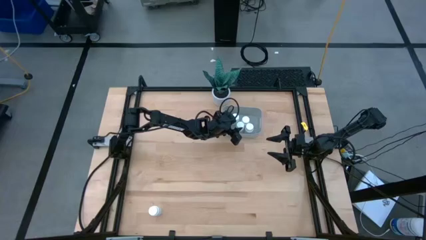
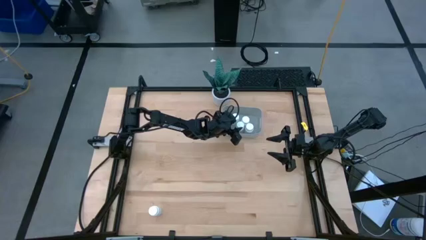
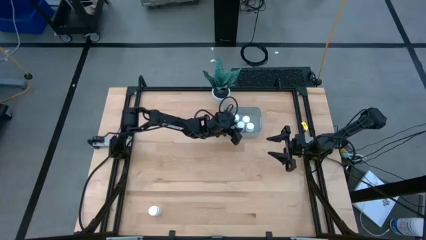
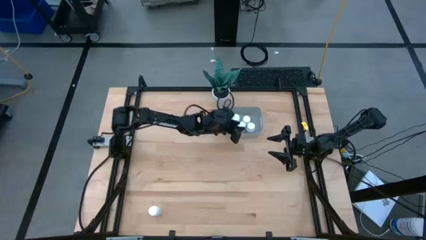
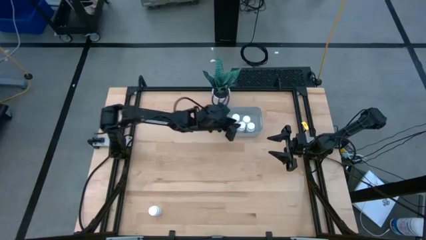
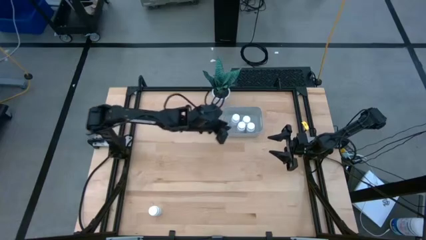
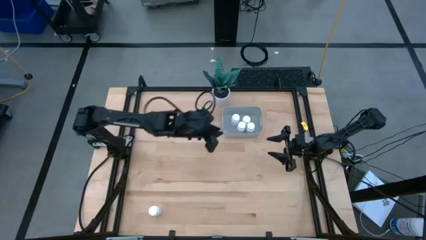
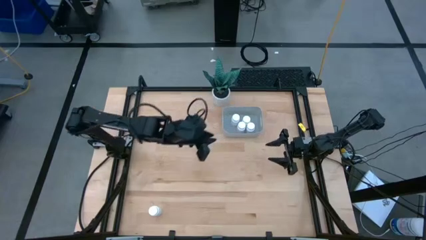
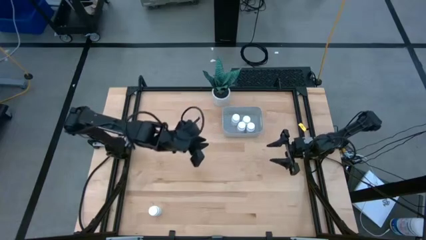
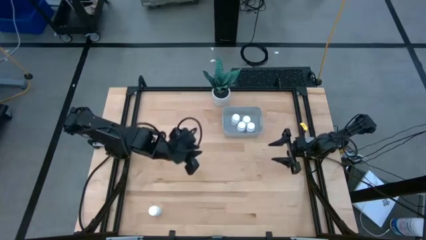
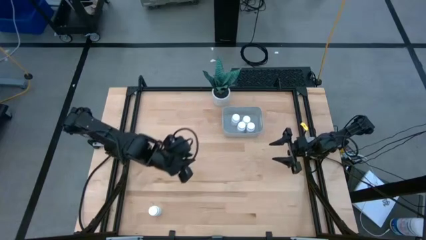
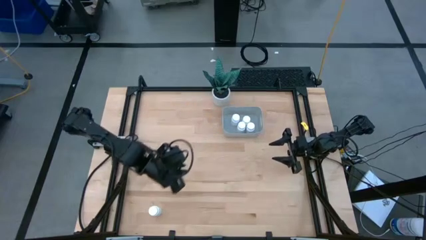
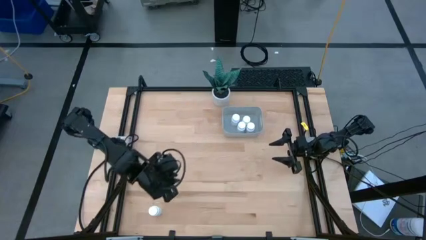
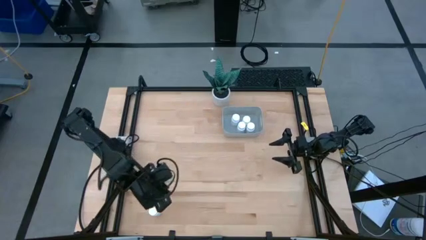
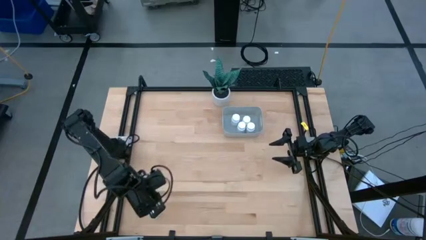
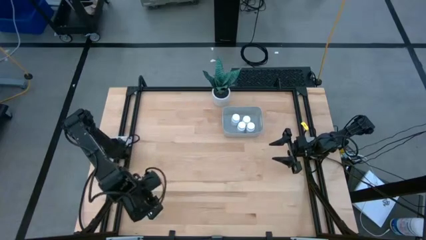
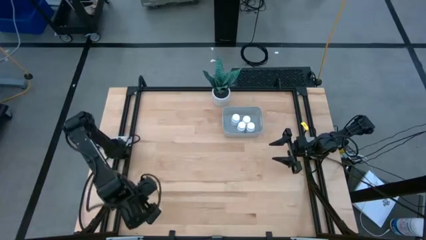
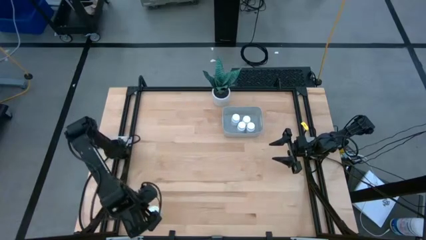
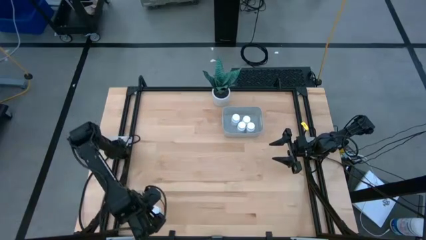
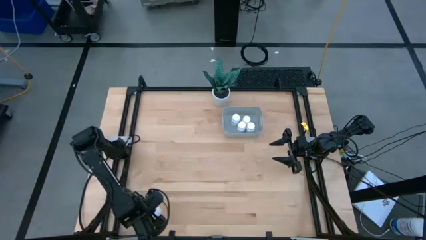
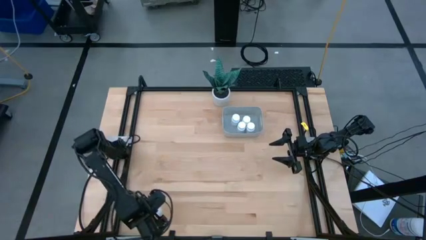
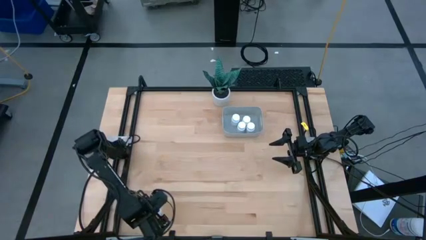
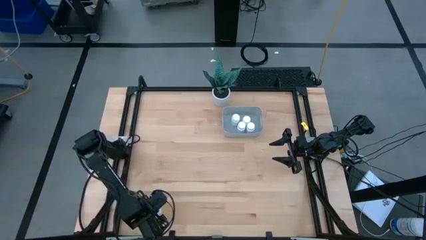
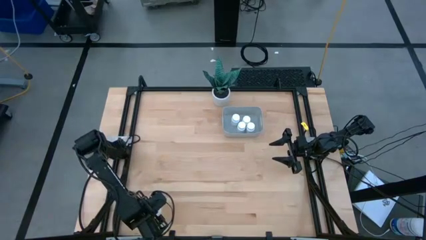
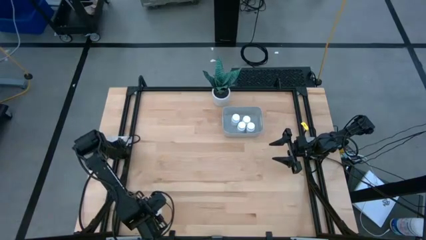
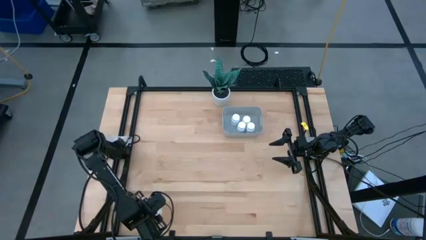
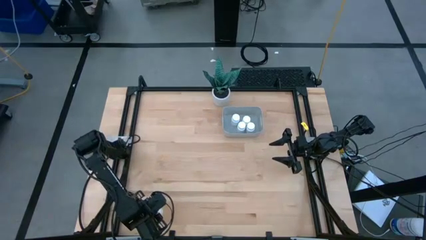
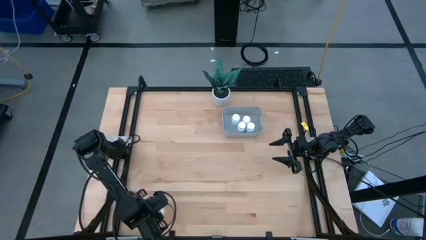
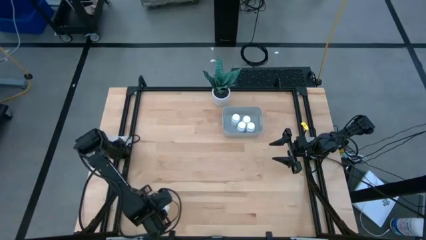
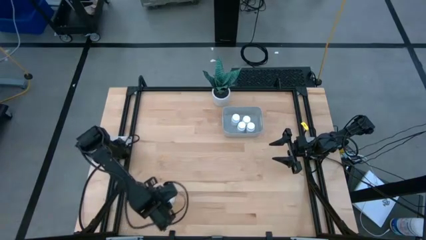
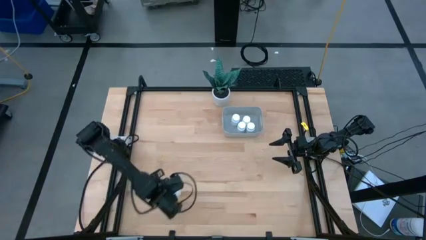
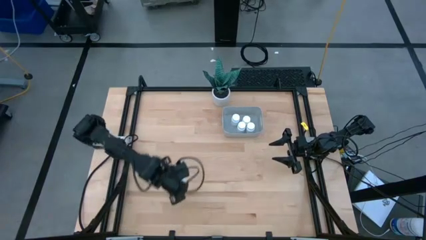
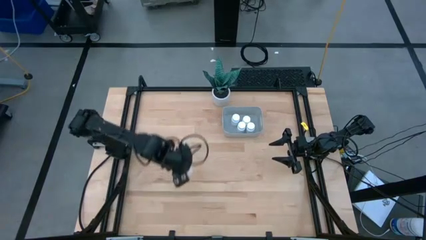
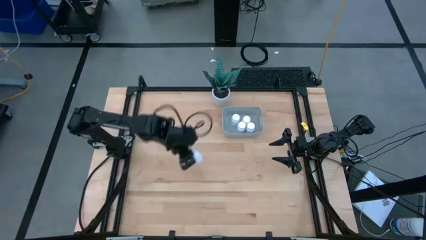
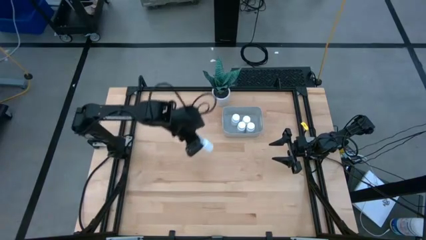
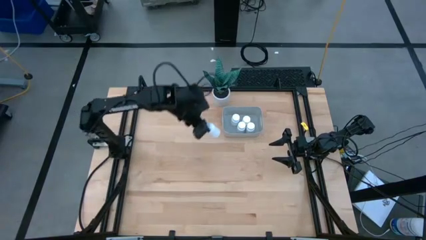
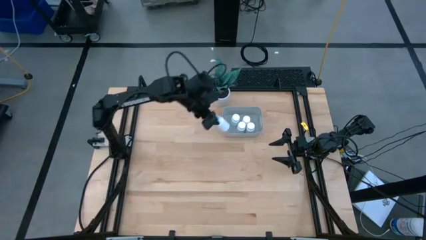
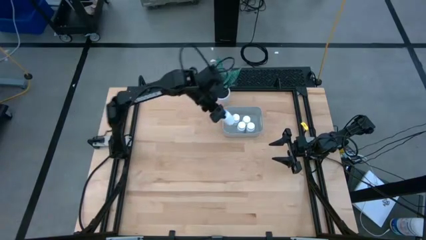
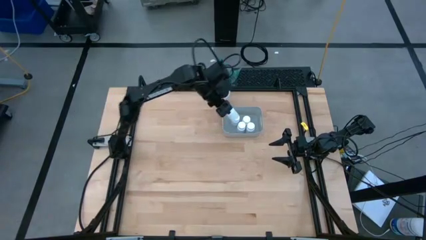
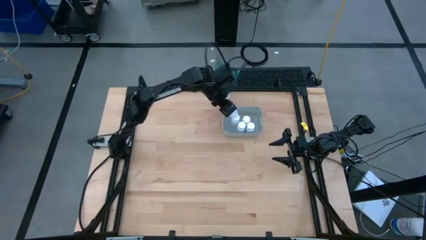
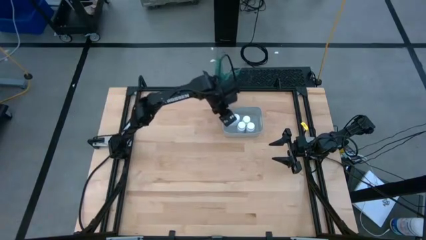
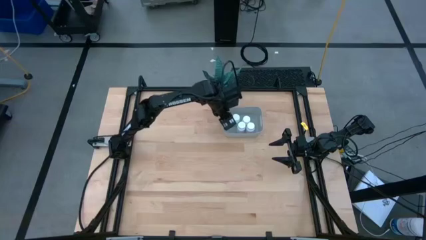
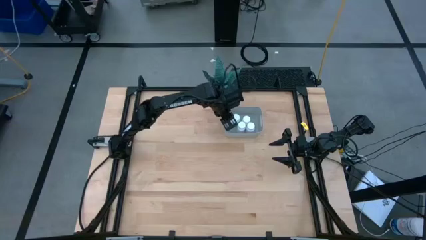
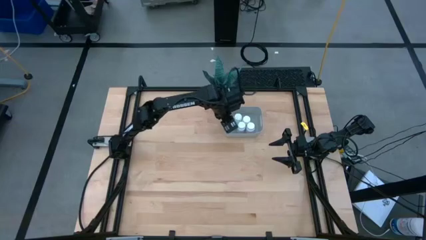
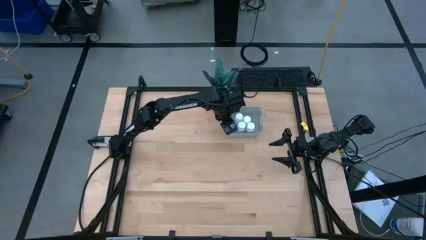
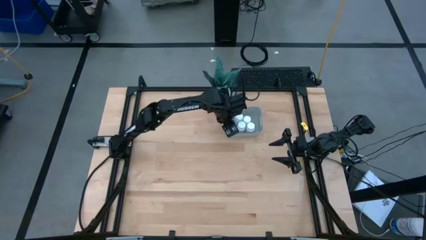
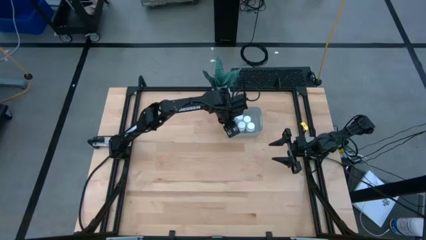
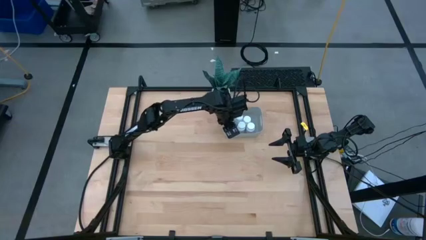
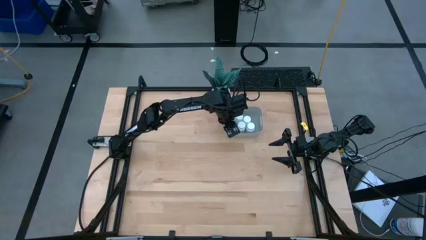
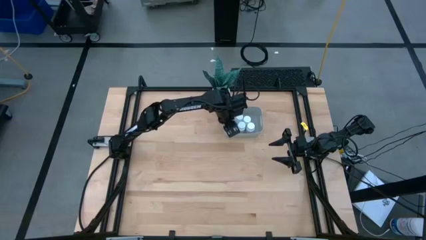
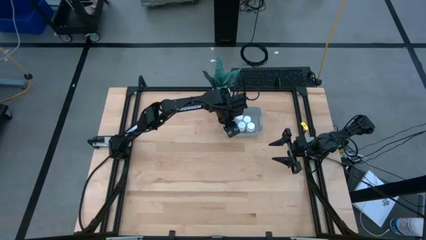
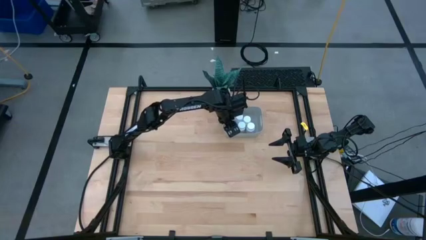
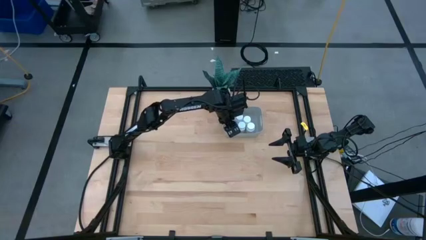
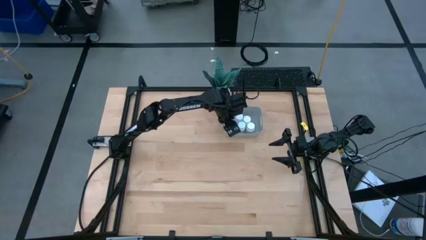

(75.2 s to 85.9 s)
Task: Pick and place pill bottles into a basket
Put the white pill bottle into the gray bin

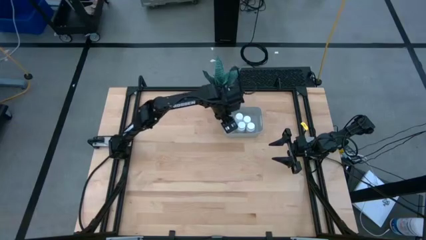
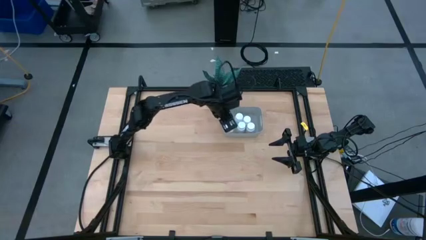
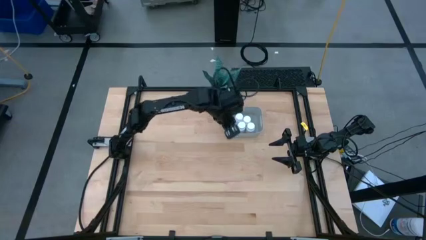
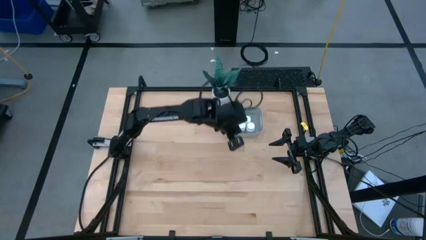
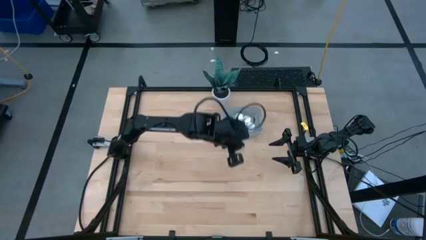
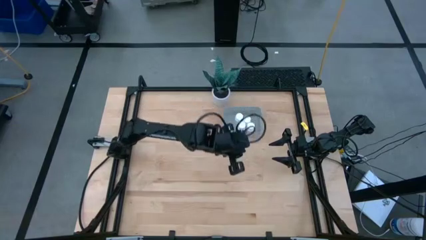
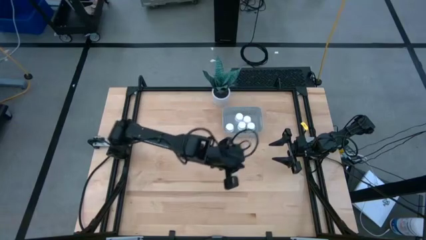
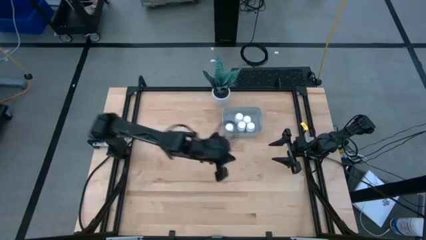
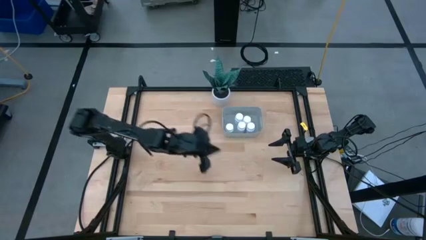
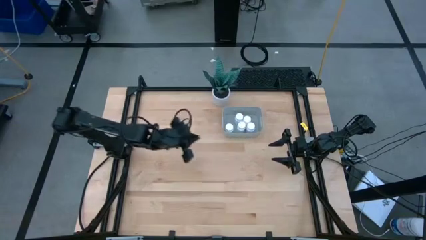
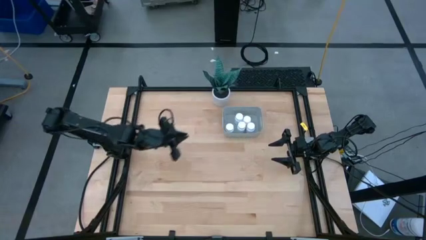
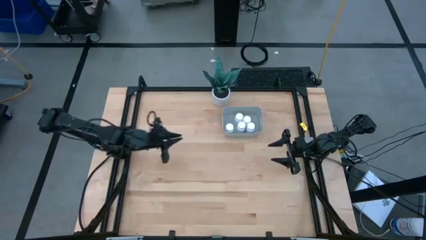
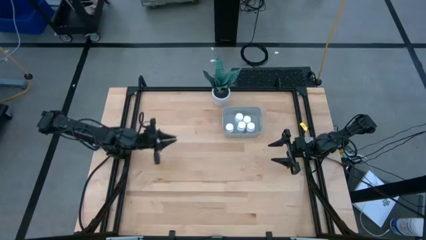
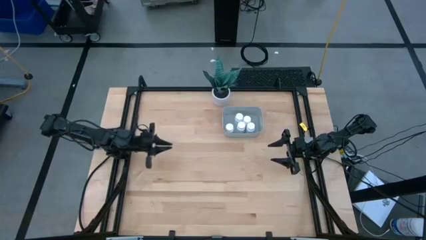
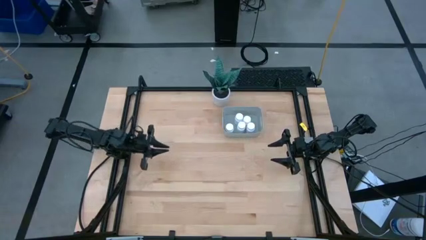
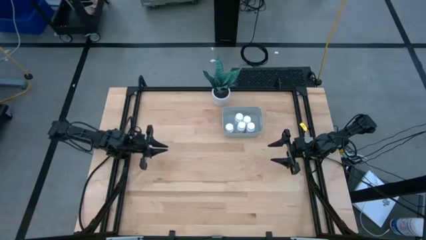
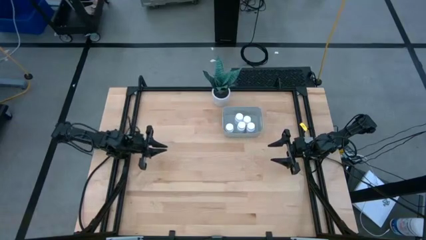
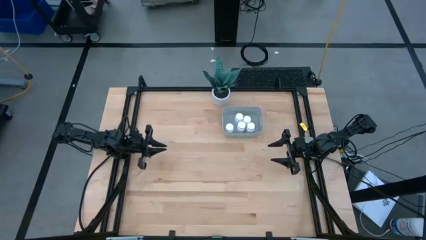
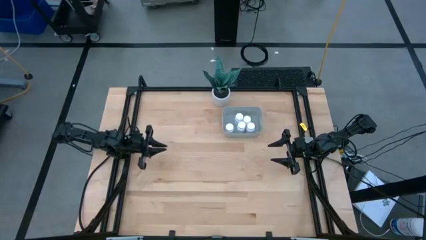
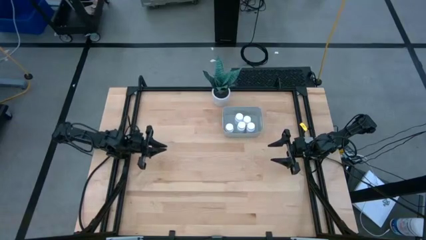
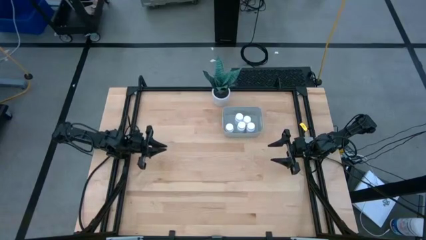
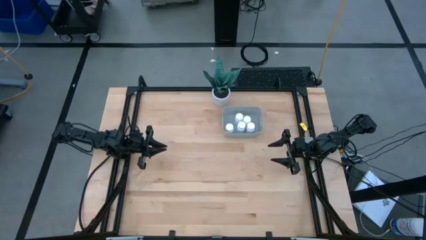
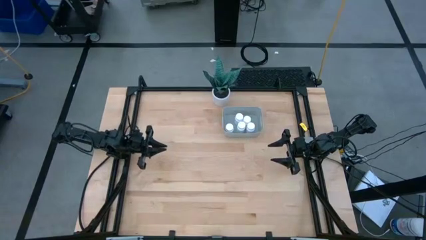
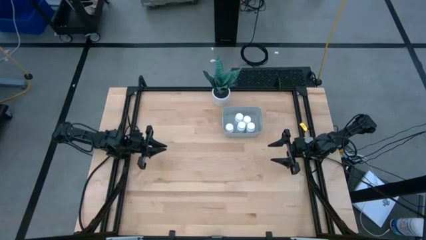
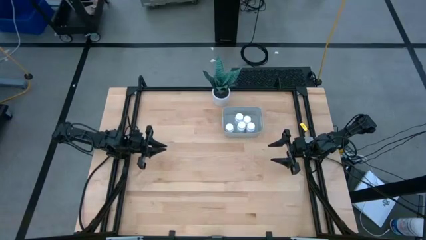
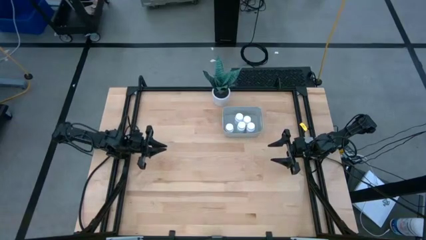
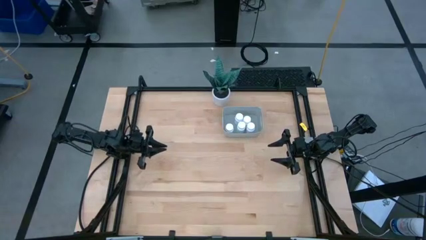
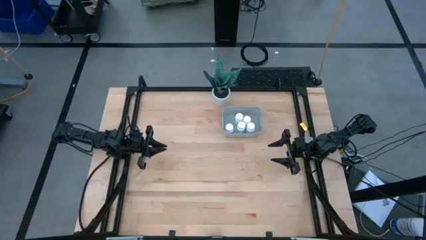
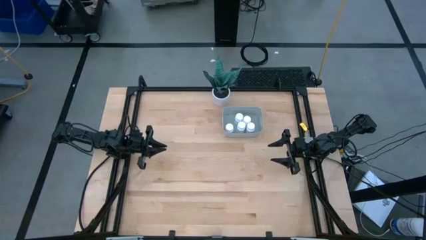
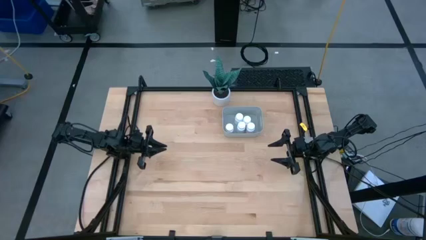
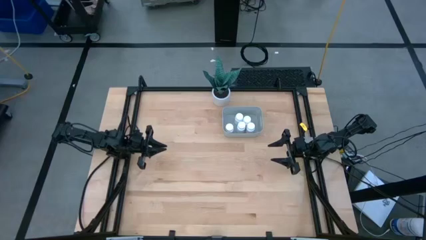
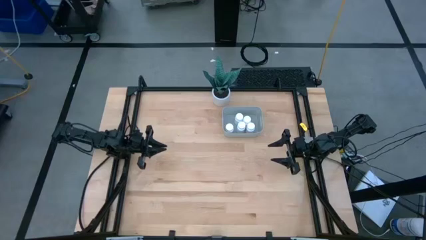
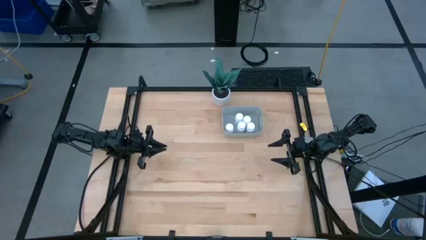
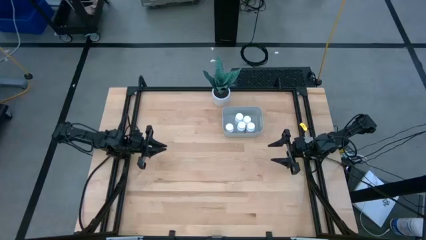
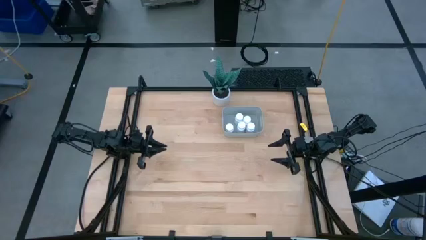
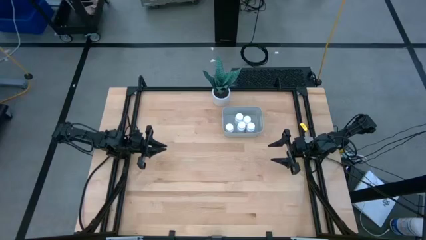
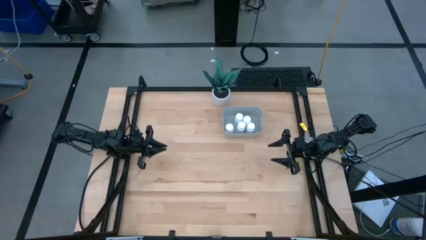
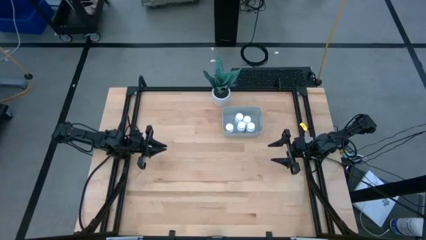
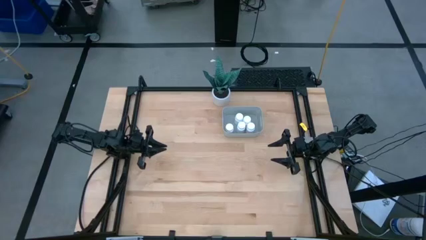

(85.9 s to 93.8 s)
Return to Home Position
